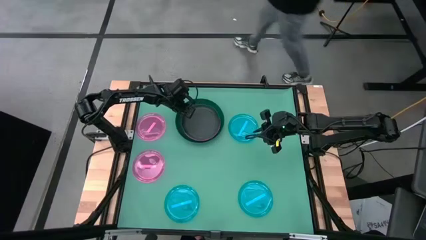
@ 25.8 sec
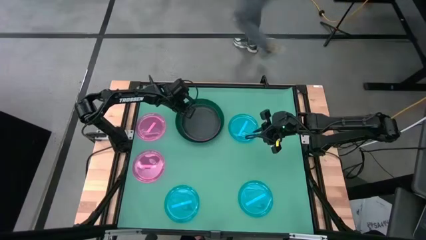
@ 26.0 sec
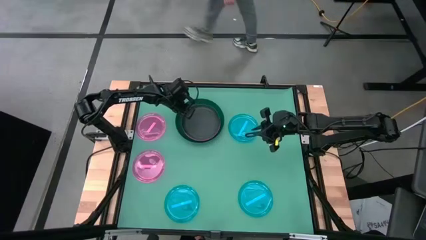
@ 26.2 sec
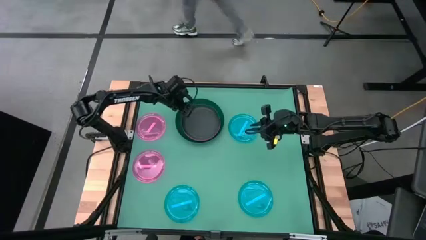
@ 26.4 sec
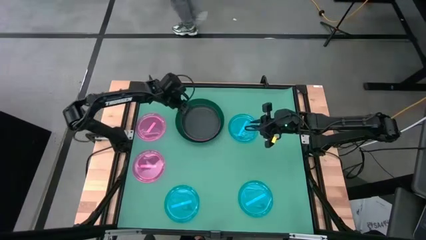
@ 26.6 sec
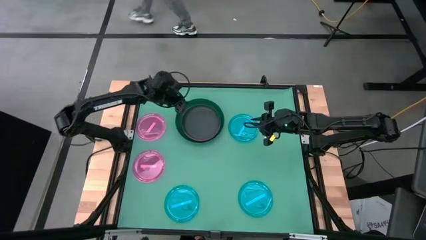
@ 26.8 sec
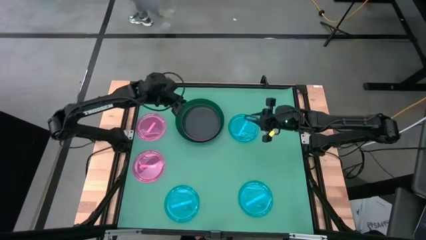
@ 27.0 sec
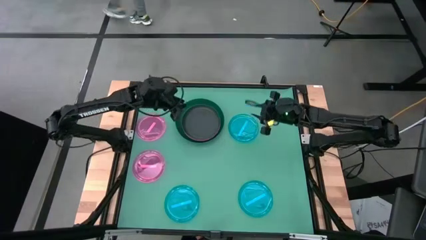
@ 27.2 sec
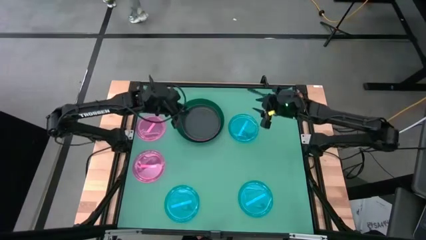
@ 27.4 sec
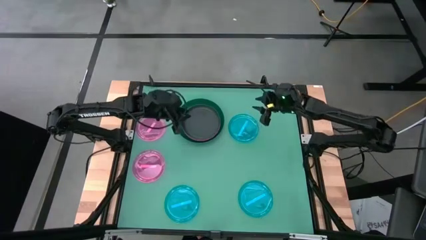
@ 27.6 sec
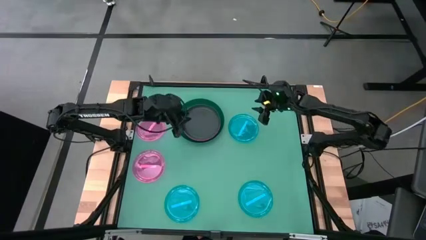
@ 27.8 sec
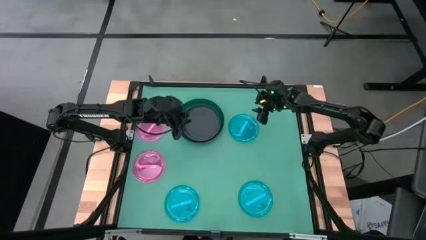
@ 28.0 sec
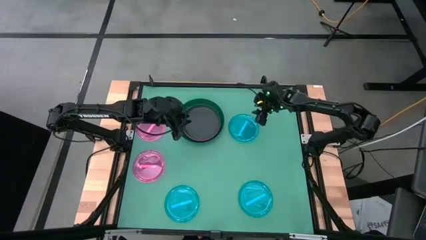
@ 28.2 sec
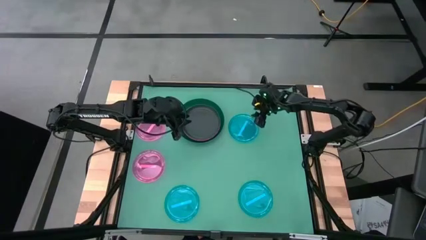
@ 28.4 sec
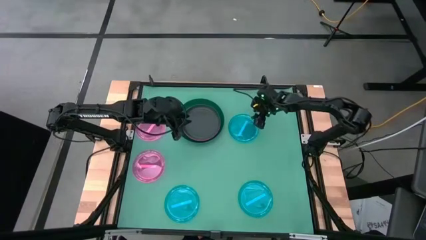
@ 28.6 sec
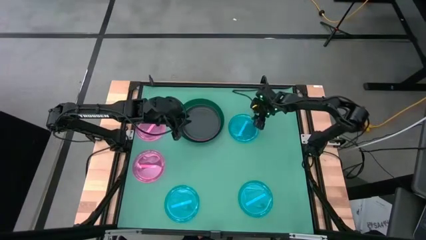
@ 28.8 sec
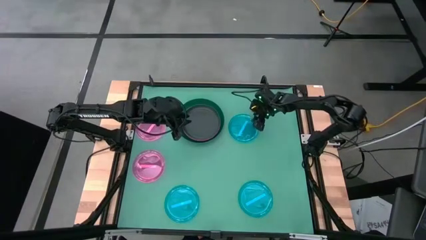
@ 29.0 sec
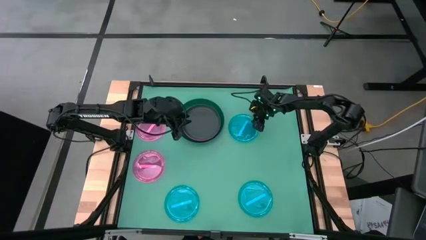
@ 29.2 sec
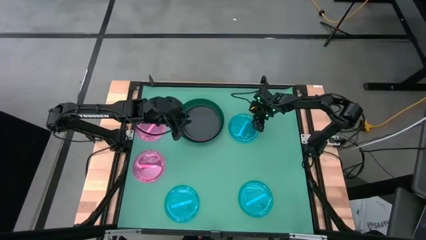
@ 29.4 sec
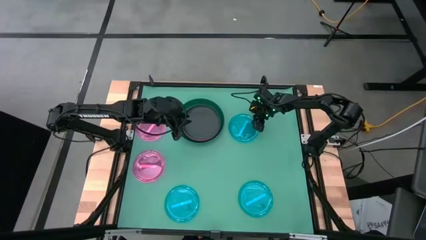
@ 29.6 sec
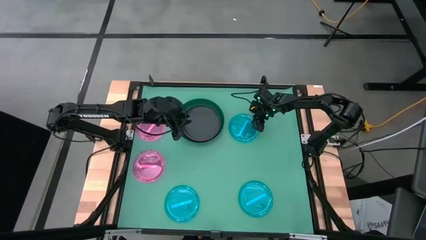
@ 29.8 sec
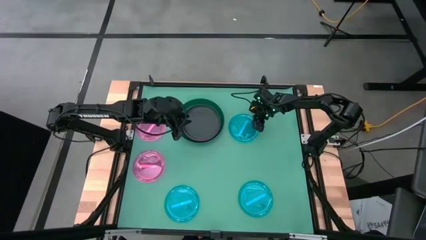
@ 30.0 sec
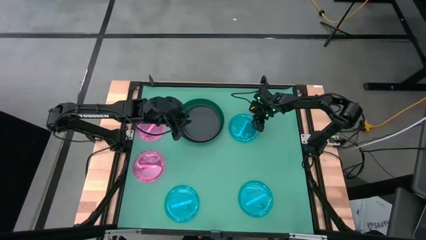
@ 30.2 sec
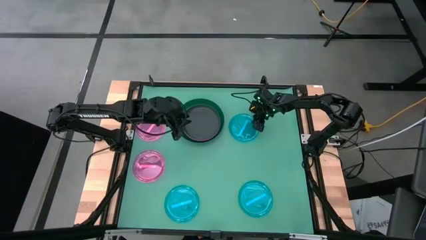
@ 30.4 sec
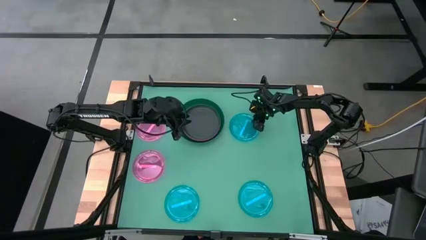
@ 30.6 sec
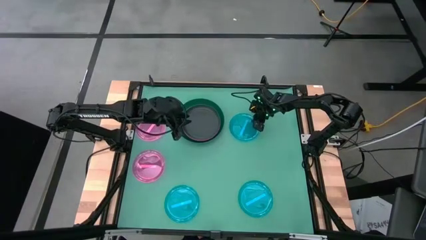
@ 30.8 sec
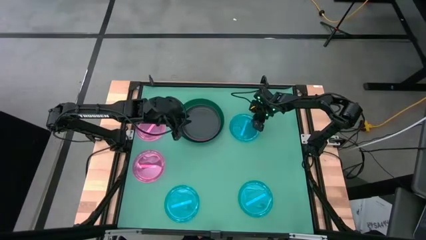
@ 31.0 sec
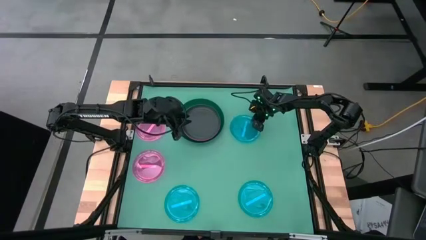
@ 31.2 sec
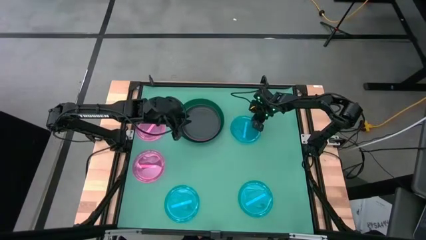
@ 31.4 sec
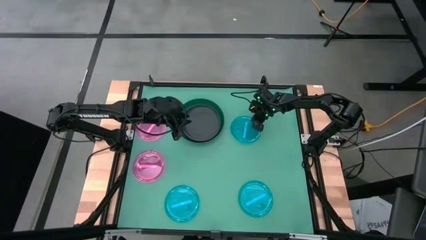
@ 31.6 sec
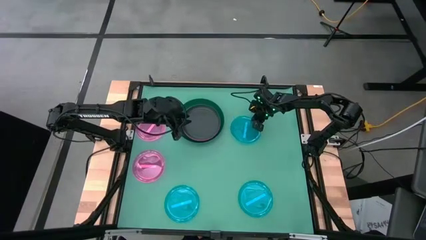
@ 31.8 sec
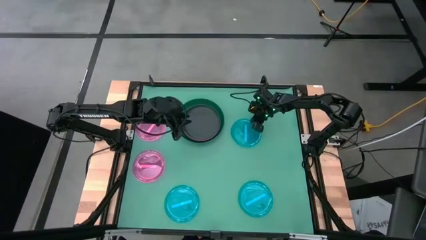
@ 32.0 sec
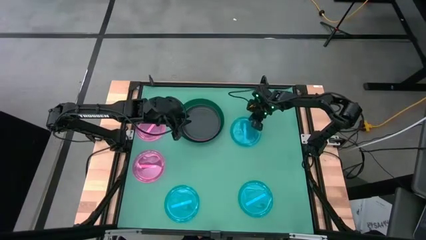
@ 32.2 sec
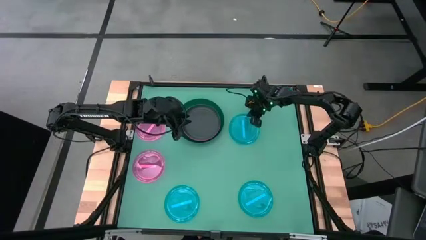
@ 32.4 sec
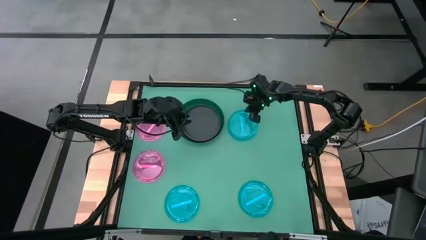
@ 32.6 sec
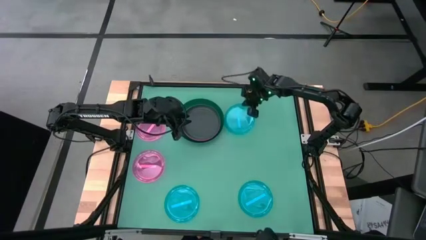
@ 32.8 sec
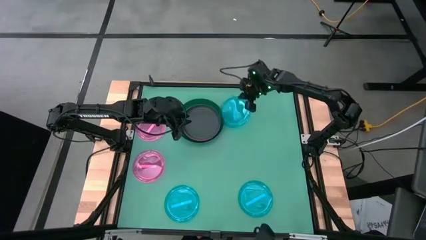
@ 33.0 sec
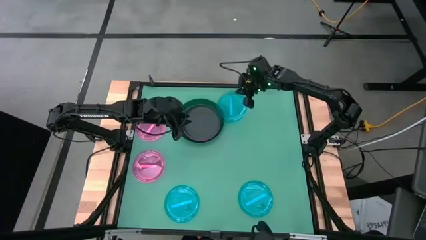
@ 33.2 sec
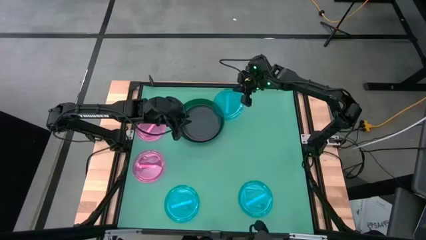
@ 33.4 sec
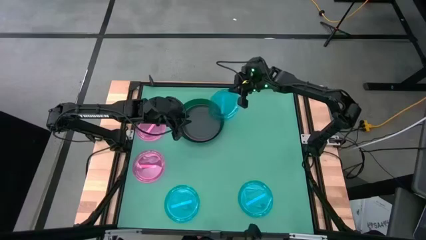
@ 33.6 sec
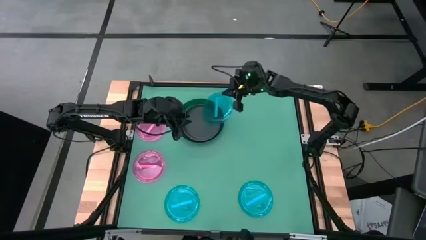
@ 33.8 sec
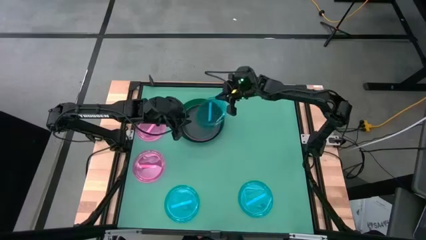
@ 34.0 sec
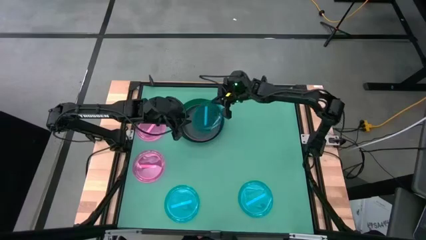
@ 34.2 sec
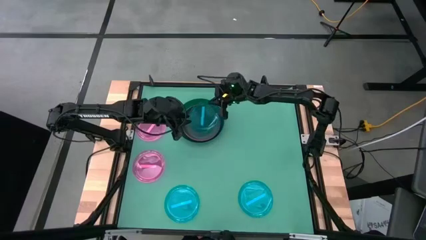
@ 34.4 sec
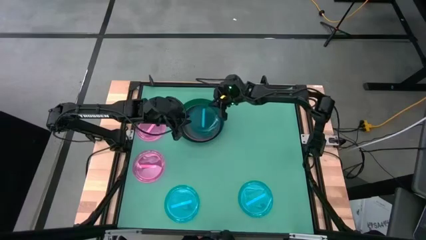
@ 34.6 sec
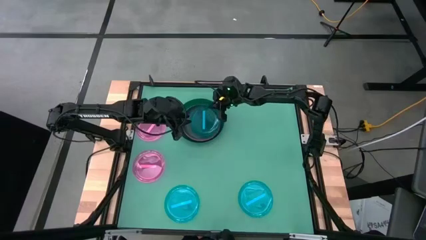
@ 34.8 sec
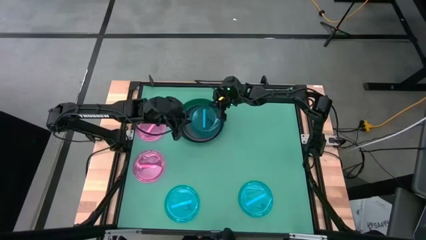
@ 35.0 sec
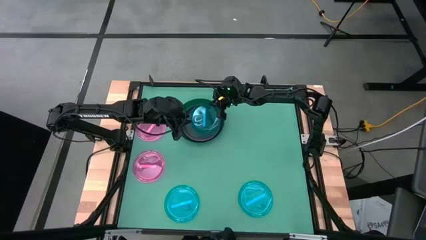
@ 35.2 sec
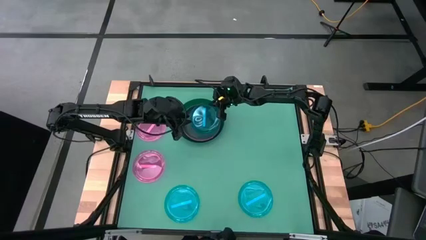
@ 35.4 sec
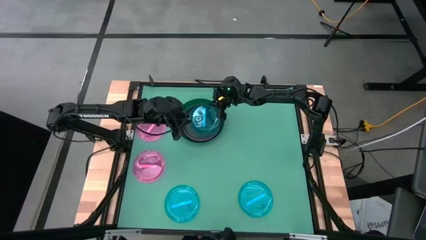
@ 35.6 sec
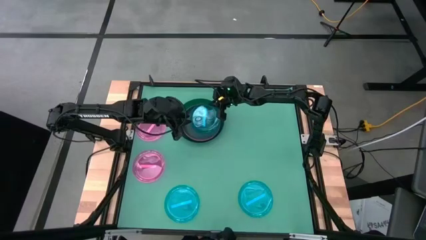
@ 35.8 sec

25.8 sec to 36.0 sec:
Task: Stack plastic plates
Stack the top blue plate on top of the black plate
